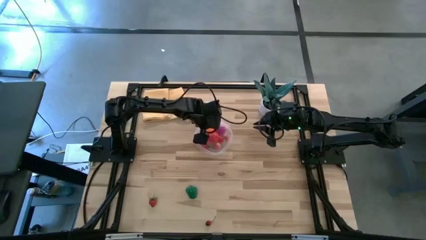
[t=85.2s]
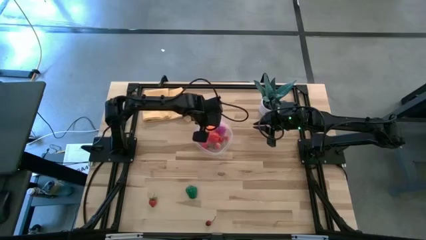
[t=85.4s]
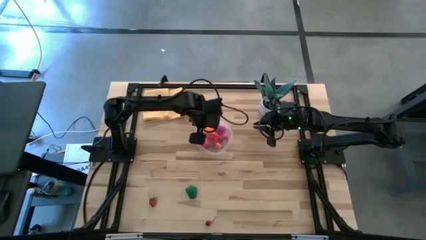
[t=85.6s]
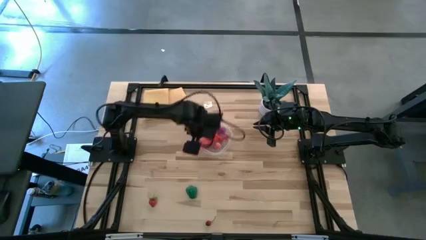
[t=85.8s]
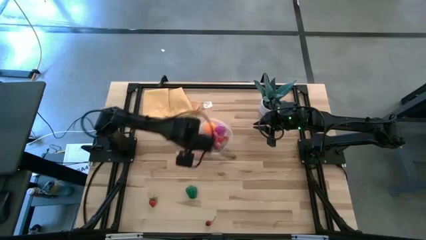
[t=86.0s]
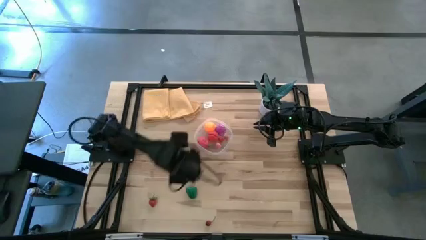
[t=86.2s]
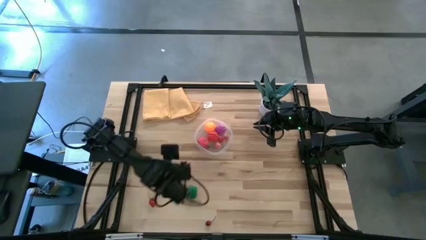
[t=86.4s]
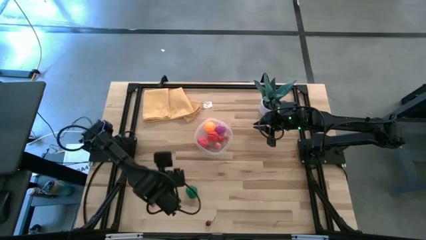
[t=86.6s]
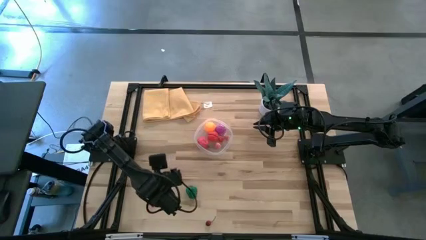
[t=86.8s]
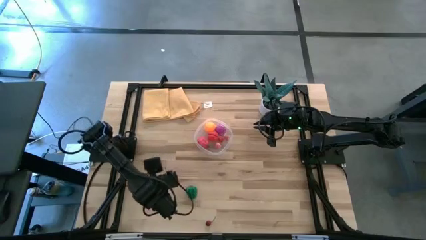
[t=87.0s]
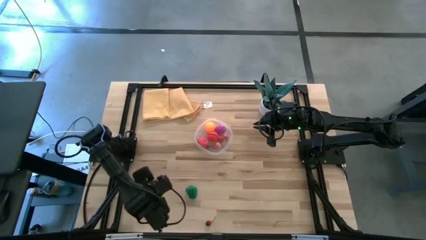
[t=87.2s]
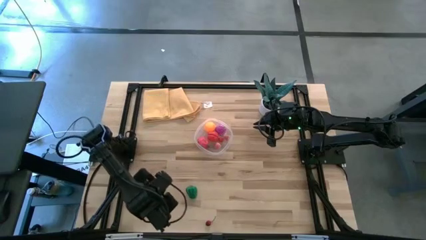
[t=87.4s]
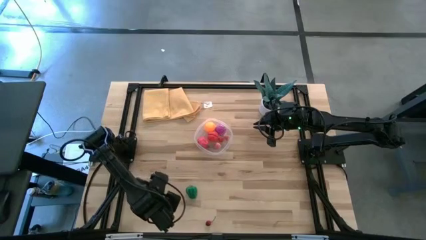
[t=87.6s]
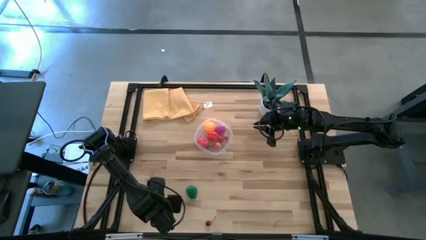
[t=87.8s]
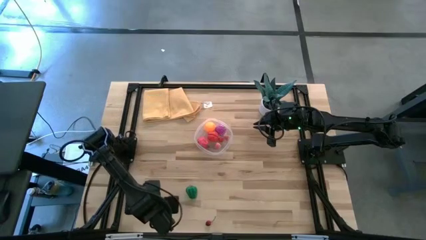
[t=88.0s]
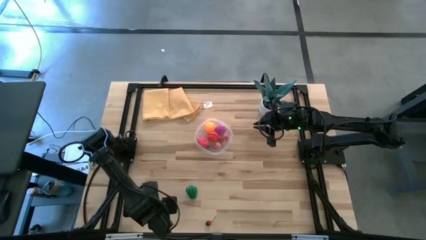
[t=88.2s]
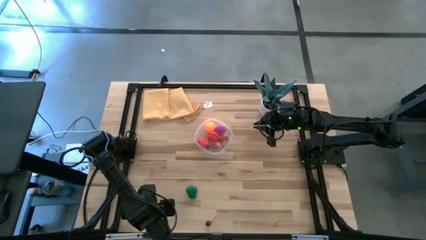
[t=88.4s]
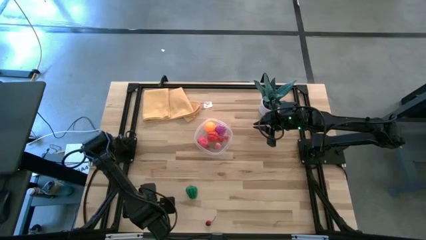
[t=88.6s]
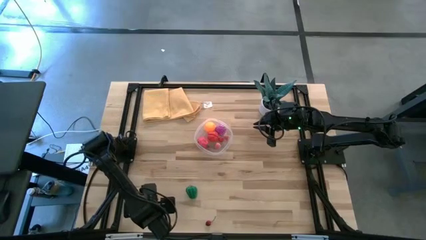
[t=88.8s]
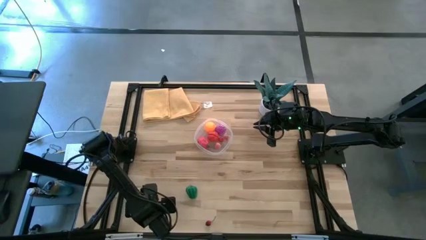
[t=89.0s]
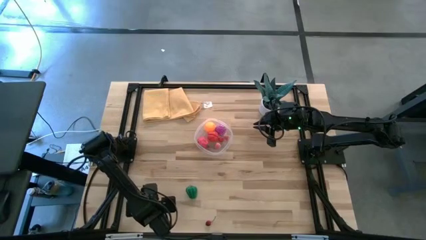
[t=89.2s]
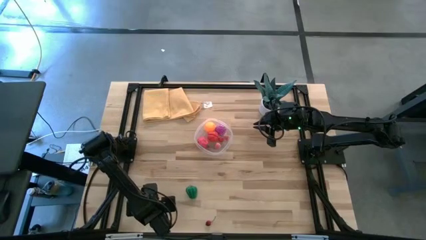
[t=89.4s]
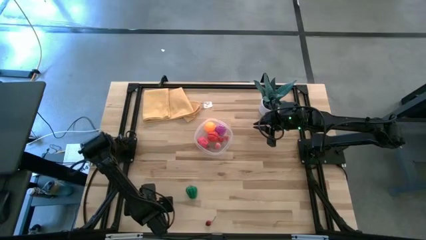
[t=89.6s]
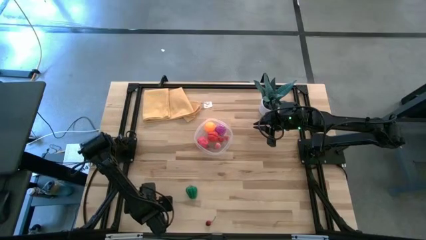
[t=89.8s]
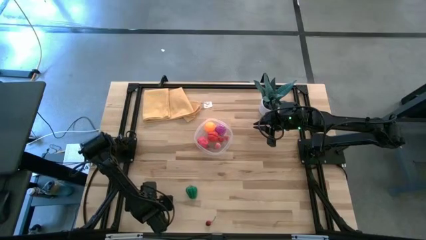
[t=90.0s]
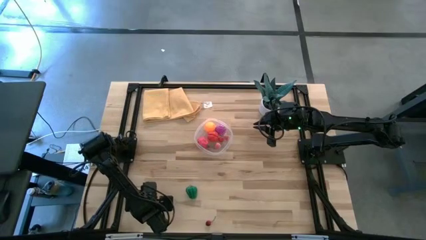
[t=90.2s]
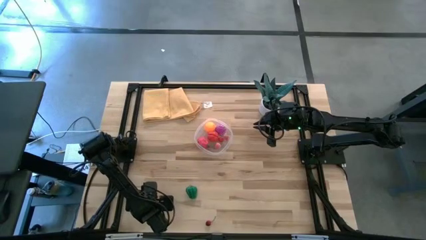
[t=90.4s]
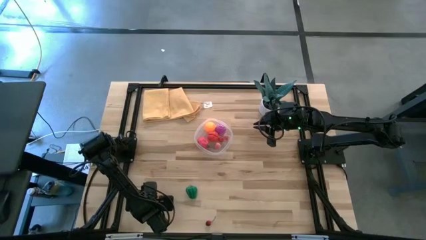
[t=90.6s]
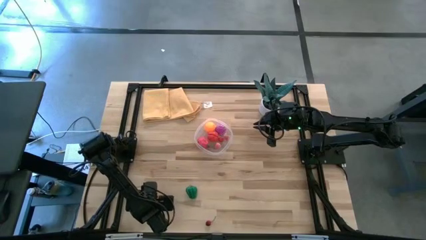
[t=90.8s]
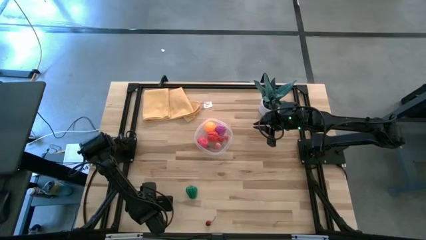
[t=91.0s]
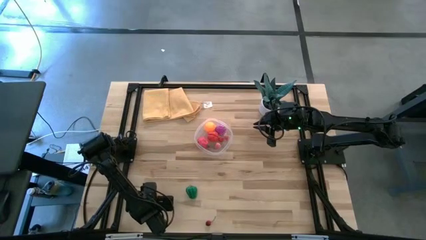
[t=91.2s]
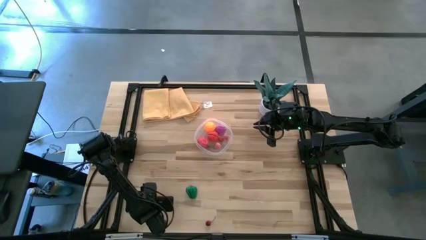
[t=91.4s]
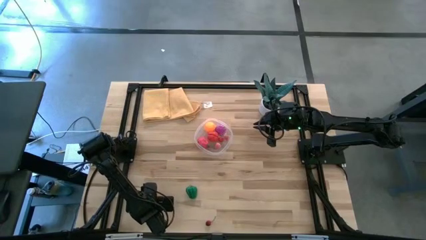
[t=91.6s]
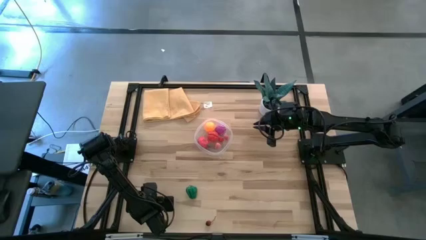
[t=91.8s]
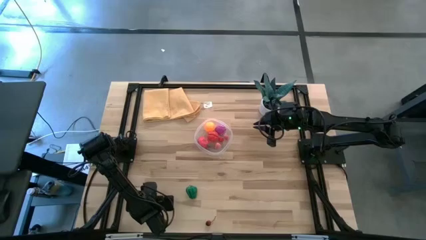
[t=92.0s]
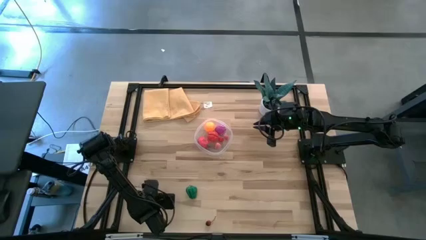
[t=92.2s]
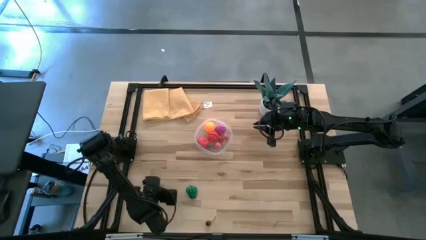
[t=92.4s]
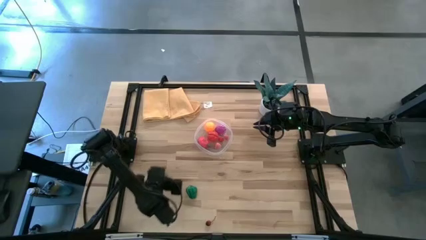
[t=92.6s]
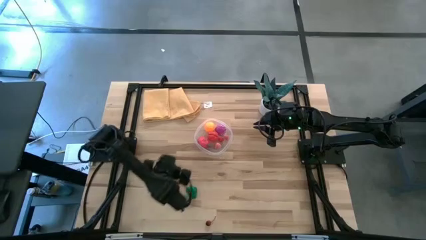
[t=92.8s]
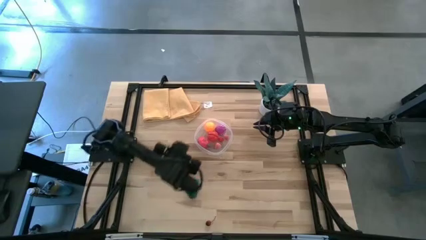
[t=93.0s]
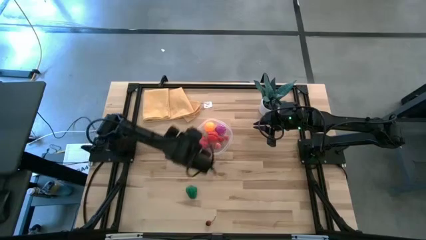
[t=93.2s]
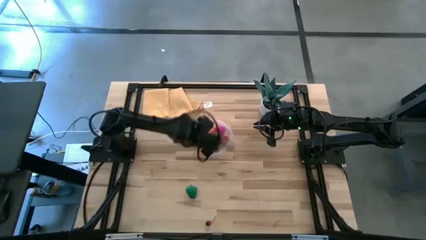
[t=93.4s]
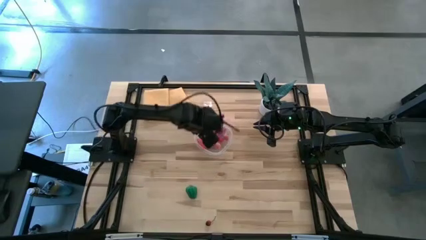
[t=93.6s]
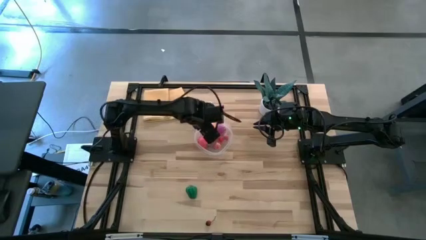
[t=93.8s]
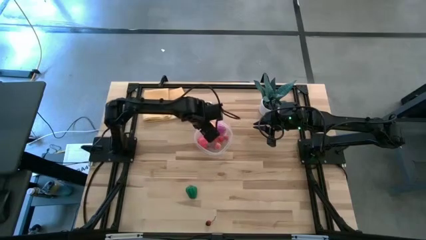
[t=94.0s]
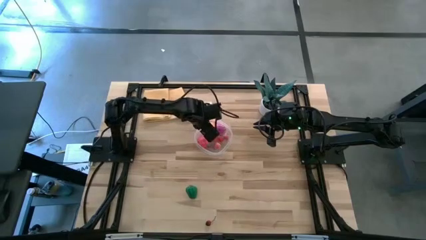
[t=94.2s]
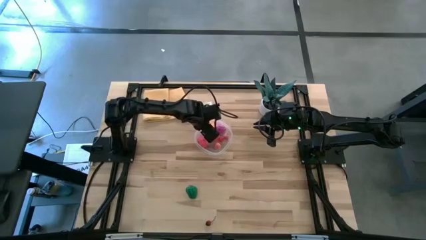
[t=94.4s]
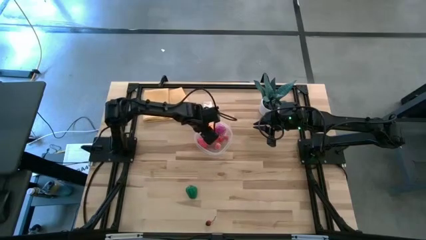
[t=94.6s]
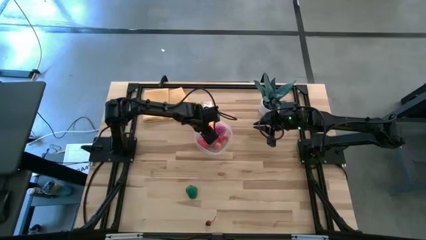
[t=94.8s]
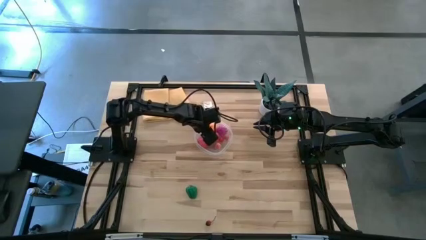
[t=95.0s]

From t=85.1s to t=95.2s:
Task: Pick and placing Produce into tupperware
Put the strawberry into the transparent bin

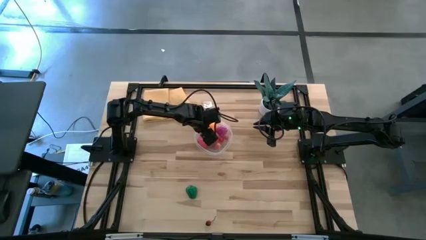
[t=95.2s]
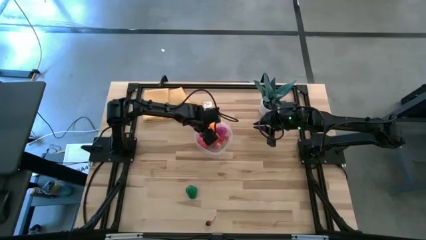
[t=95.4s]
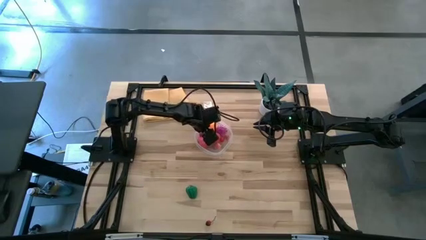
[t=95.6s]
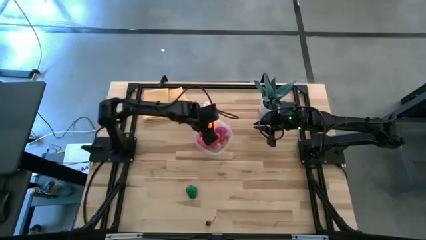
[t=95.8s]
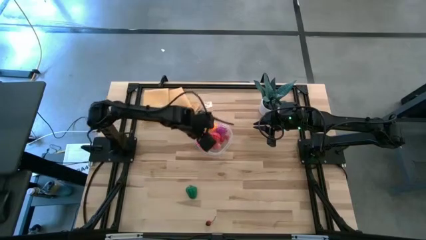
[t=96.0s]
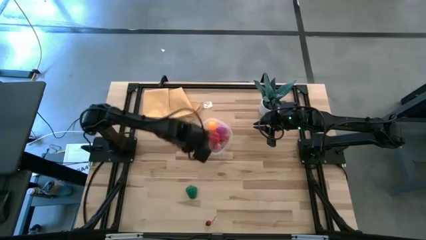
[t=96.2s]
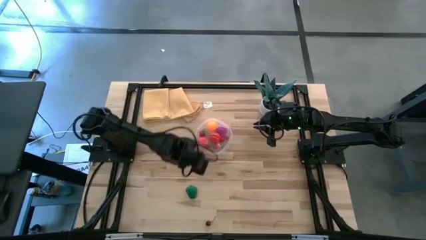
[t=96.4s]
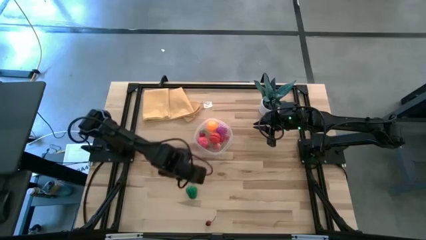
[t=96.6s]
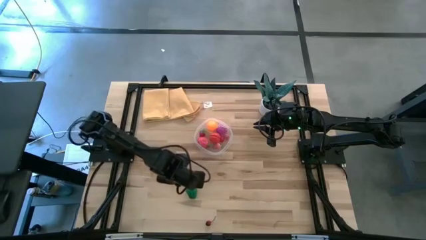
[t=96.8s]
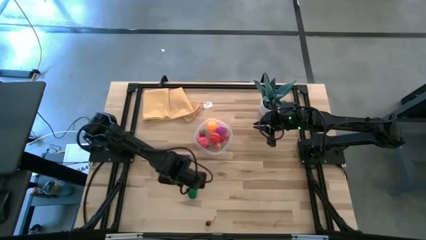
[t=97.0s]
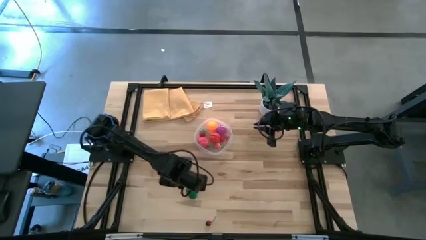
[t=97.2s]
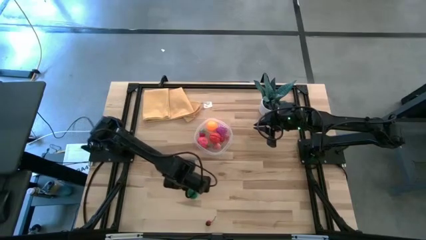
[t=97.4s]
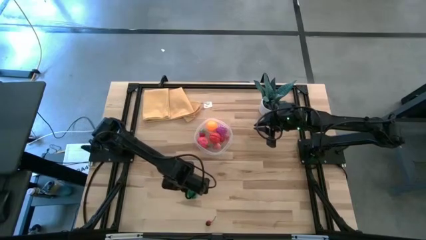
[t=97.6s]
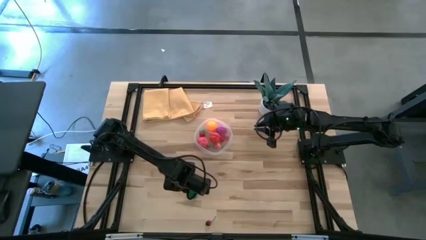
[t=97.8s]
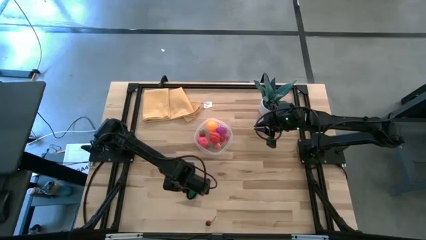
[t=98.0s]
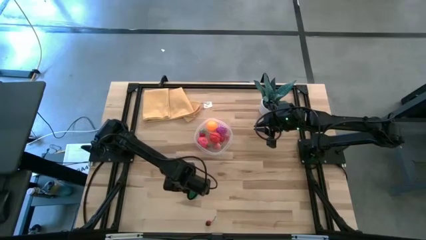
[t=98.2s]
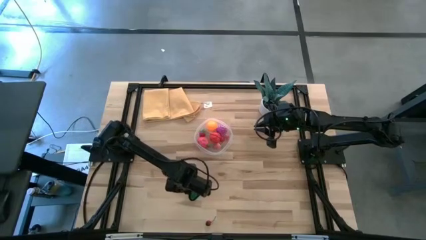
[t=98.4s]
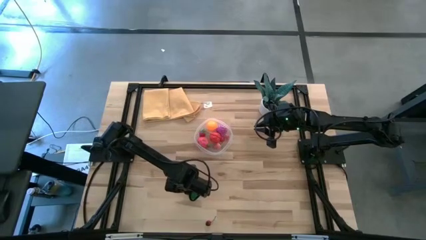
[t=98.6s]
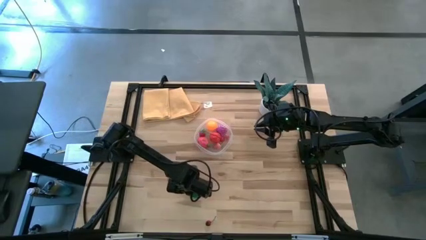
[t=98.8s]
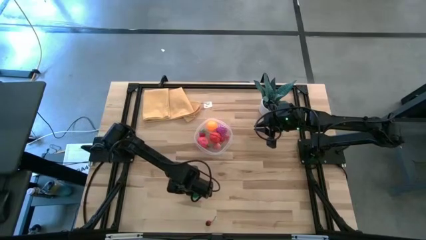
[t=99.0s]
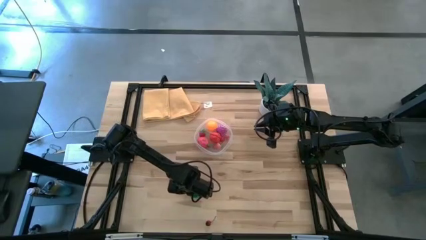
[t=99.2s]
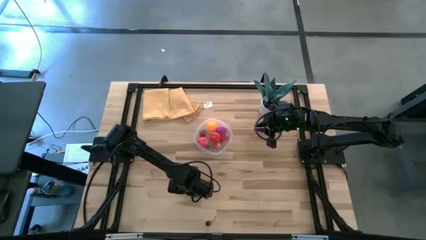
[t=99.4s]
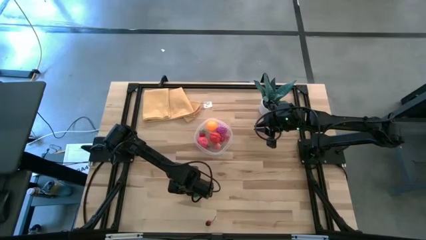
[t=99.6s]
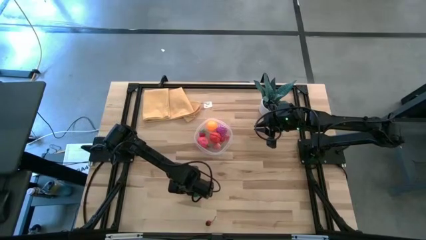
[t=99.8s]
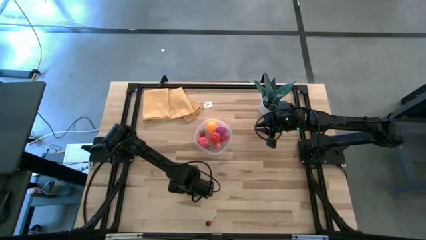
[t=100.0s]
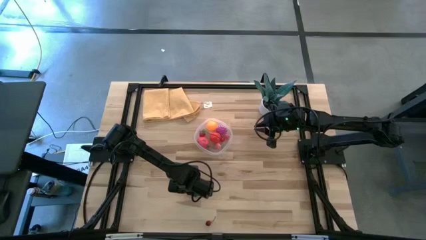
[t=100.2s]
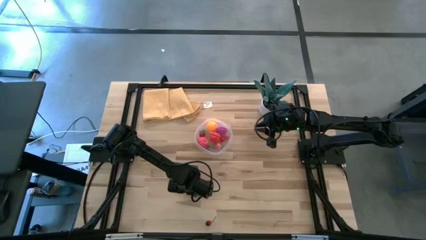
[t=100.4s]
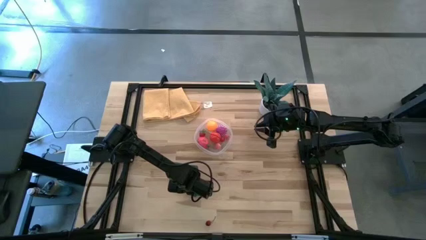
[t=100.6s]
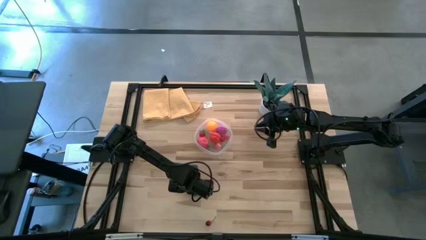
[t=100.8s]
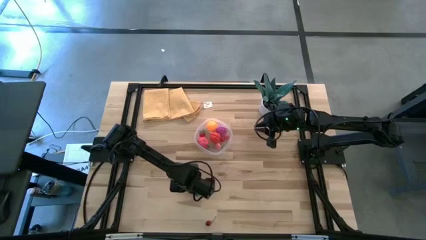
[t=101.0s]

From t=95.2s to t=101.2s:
Put the bell pepper into the transparent bin

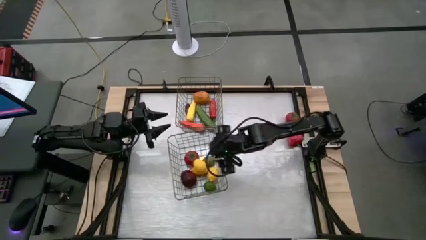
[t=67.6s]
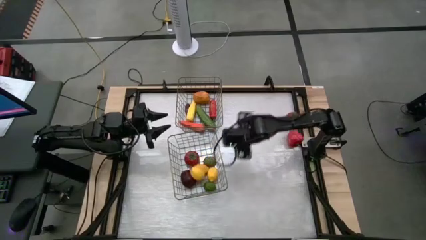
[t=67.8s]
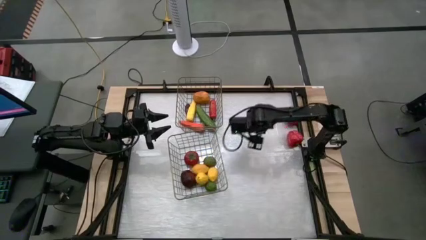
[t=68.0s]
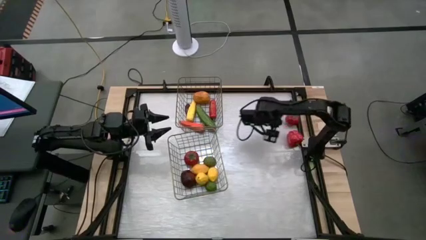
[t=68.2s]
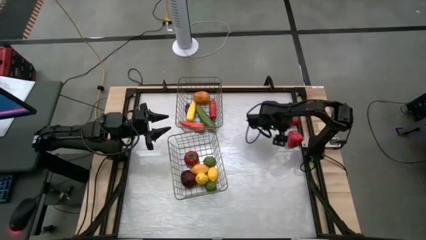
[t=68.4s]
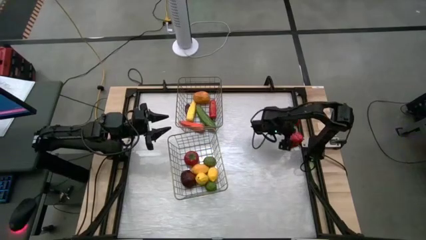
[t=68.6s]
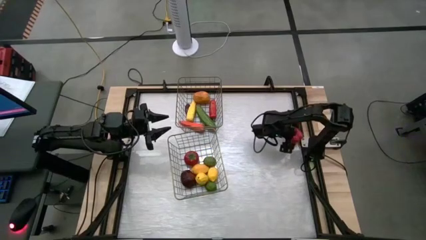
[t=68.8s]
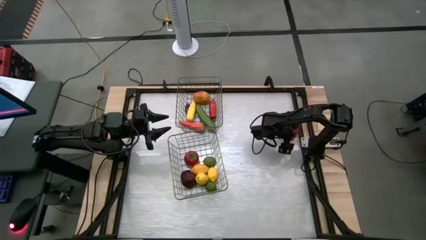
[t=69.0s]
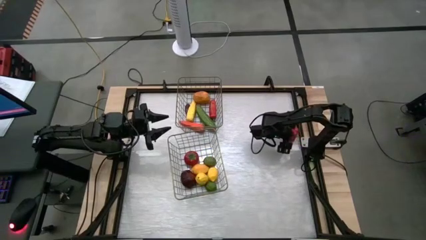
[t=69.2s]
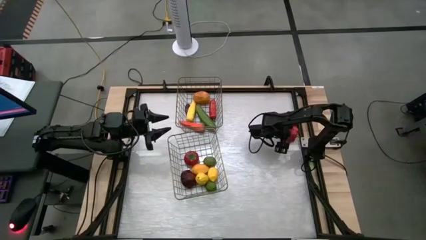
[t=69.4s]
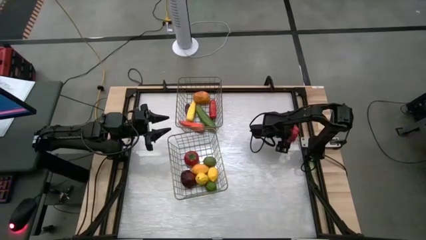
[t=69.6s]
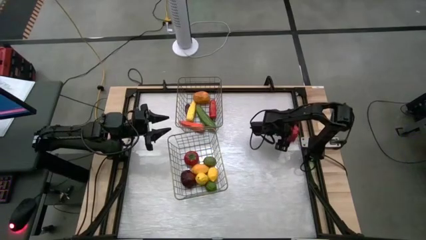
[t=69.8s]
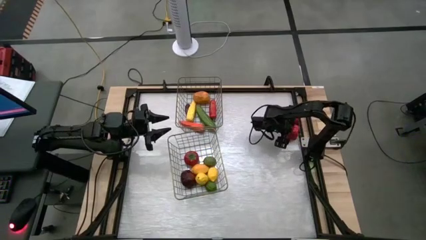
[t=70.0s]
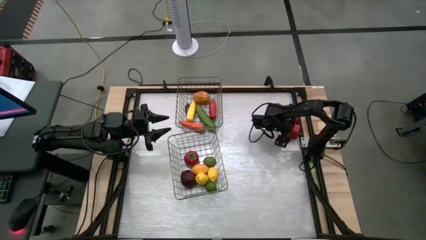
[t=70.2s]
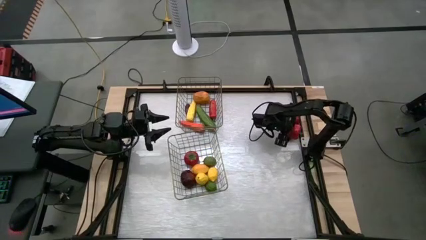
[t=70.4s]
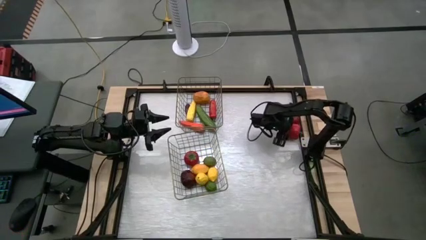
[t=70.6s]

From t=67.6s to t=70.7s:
Task: Sort produce into baskets
Put the top red bell pepper into the bottom basket
